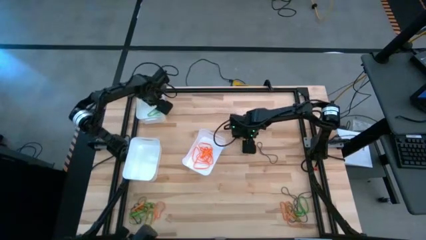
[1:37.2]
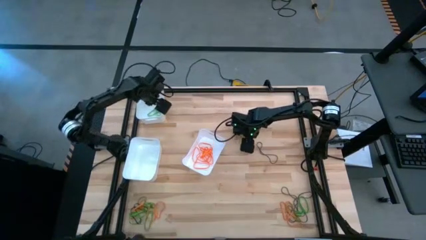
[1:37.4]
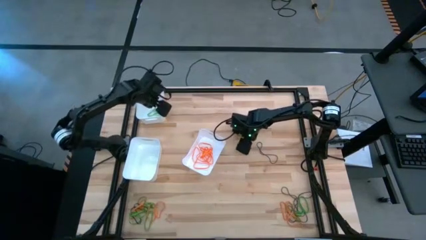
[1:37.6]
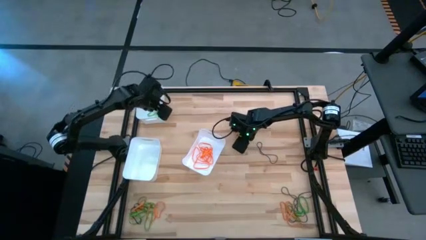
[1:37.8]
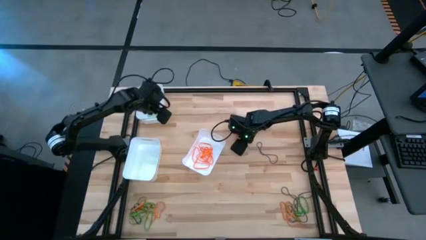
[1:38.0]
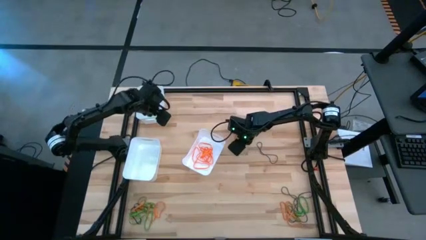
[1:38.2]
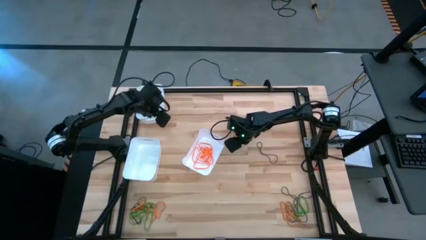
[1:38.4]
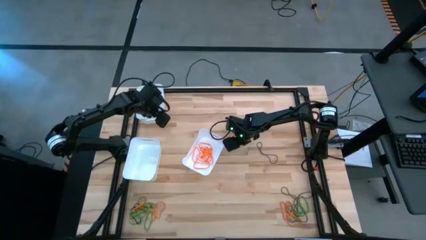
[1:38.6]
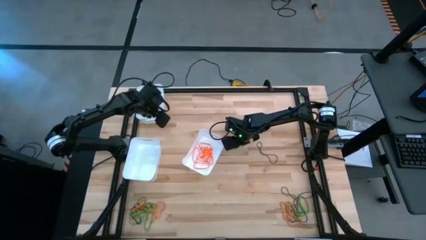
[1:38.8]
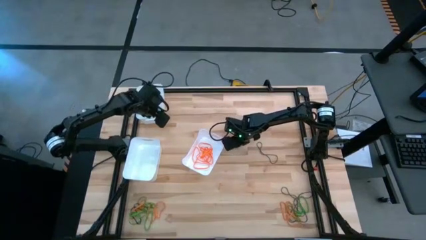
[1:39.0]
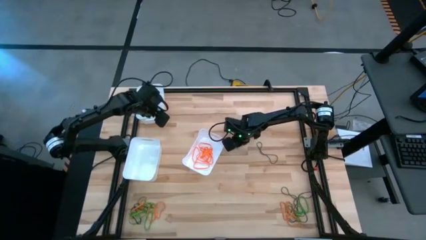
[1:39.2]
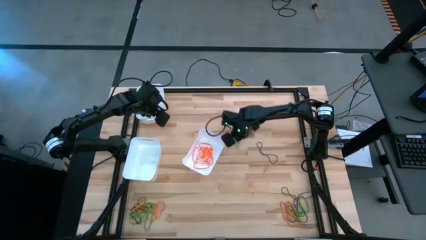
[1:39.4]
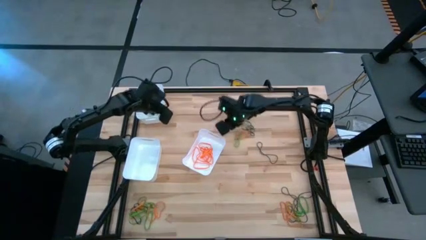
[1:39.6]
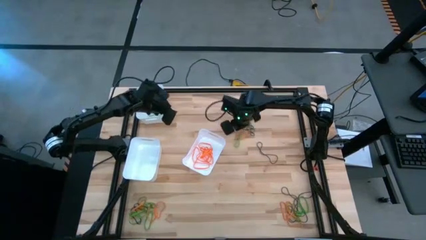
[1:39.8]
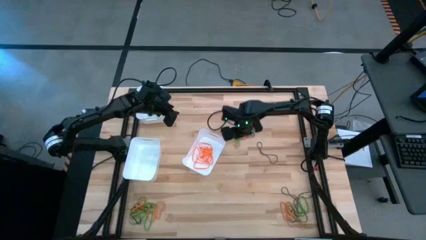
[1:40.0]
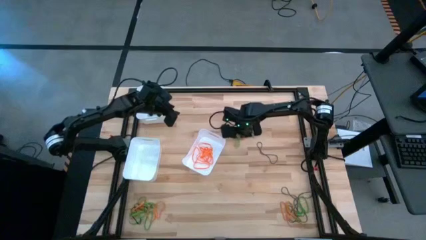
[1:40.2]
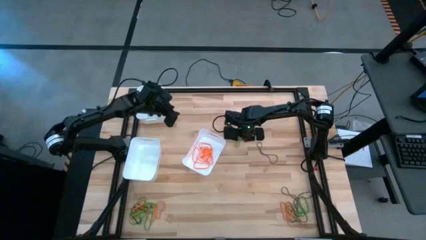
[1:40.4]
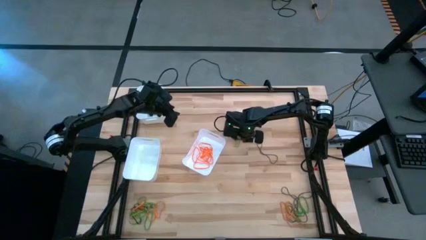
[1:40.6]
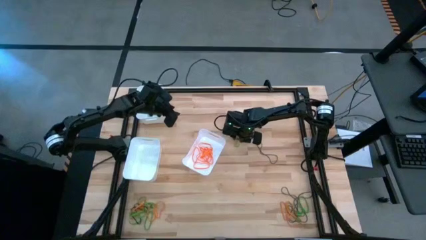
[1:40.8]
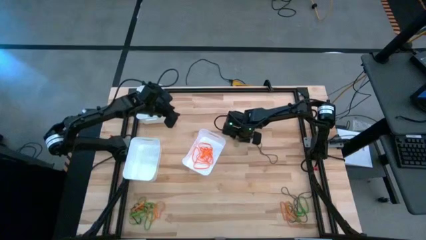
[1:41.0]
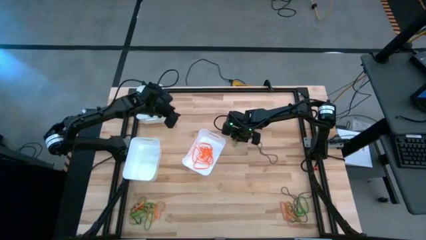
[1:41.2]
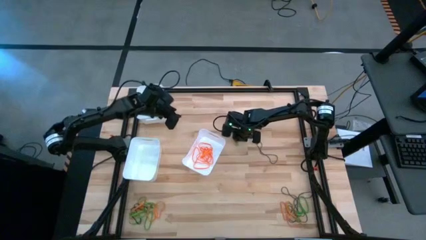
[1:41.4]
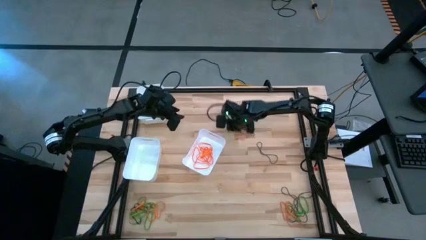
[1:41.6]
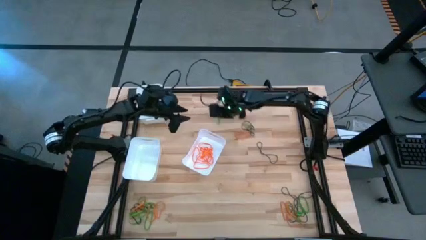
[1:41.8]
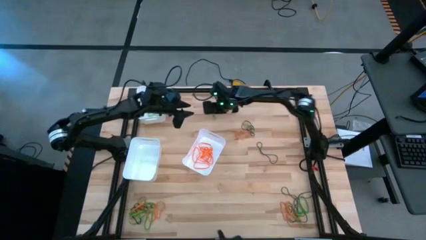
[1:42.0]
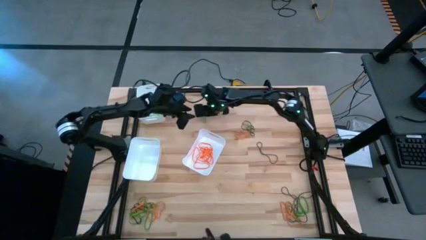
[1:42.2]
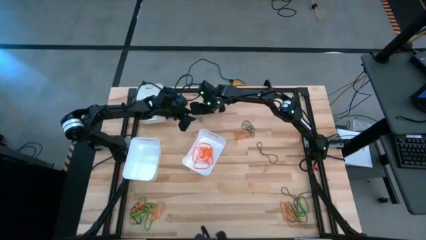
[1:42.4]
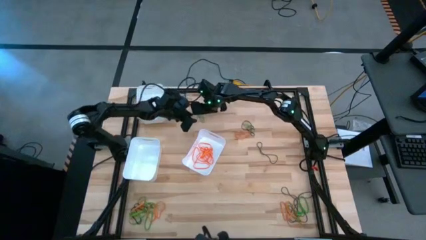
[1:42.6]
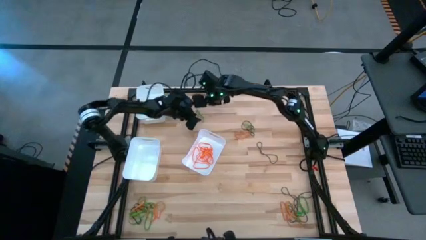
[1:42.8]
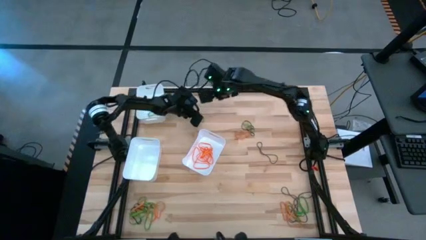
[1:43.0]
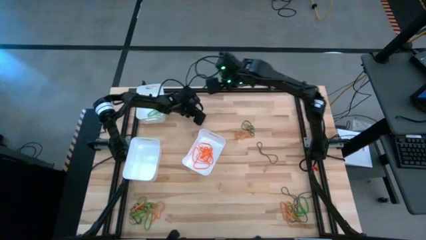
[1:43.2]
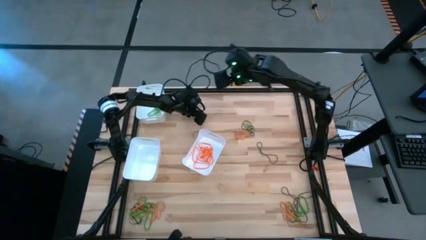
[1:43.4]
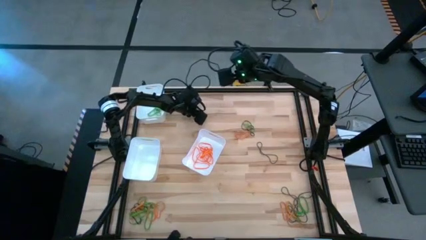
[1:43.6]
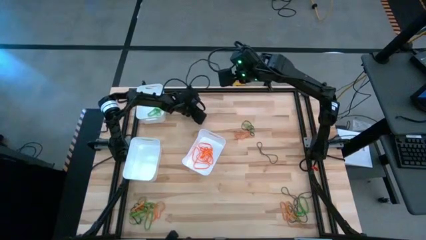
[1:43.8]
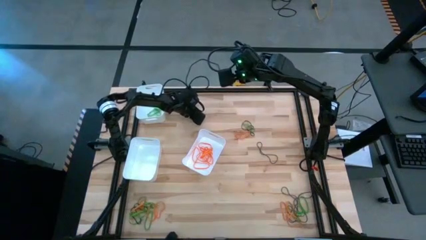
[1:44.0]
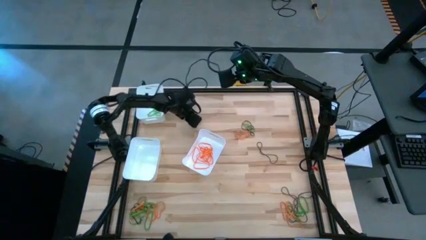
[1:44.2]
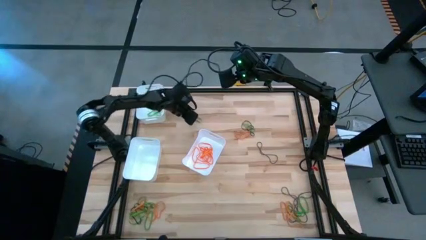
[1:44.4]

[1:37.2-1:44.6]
Task: Sort rubber bands into baskets
Put the green rubber band into the top white bin

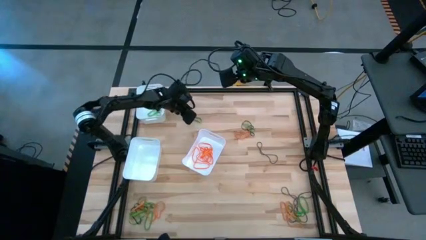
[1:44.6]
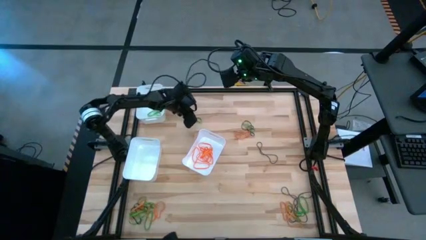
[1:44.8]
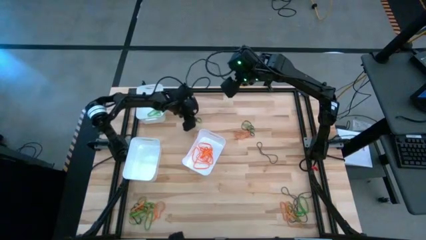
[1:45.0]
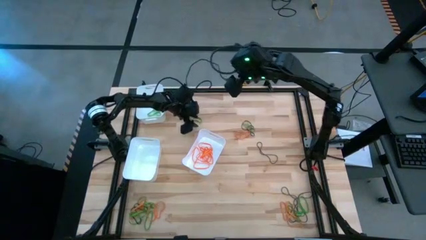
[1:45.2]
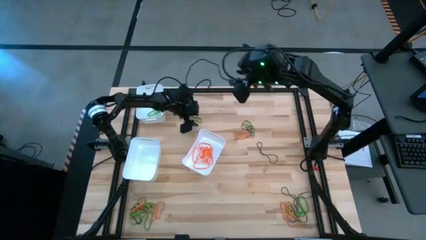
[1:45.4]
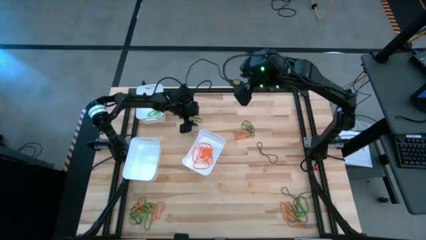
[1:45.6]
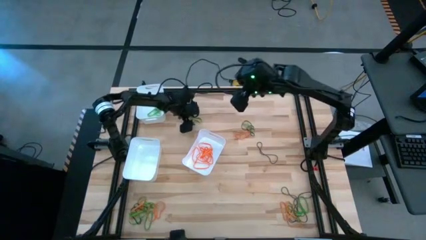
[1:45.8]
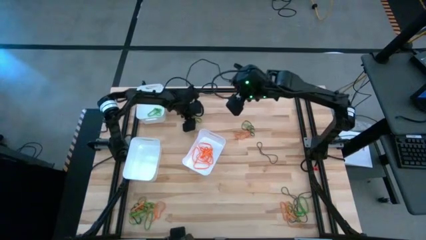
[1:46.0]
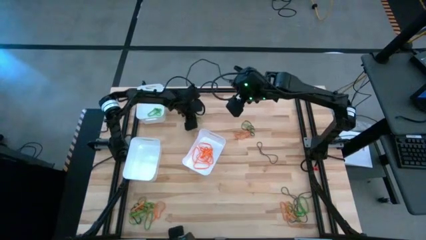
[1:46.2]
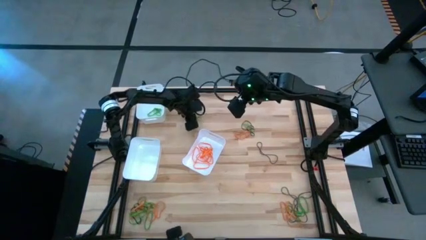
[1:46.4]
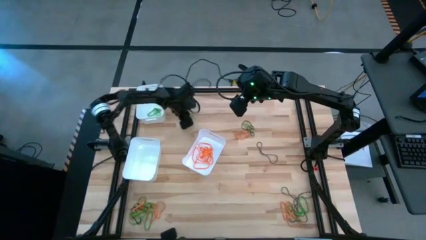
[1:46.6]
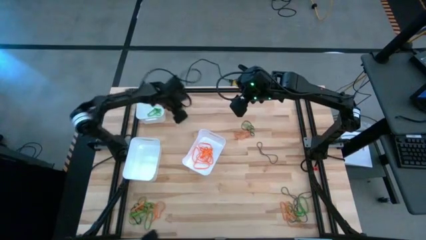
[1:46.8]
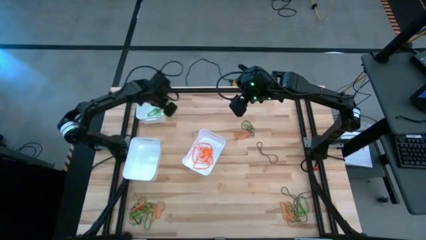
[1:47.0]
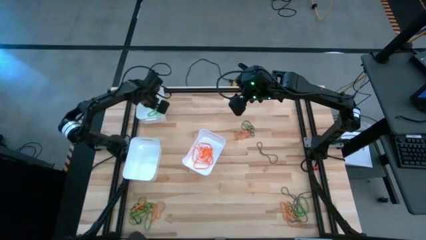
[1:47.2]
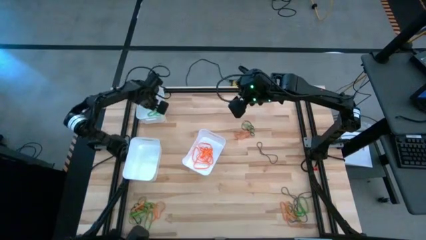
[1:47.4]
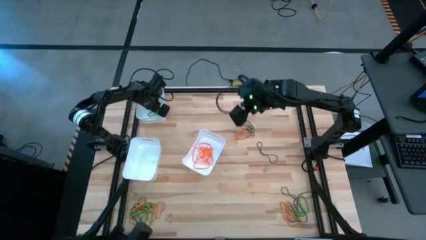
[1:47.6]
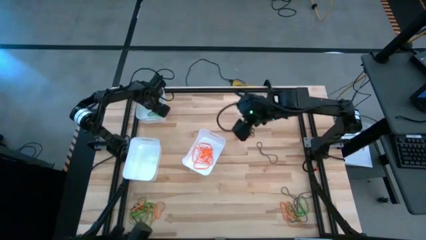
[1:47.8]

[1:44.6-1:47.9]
Put the green rubber band into the top white bin

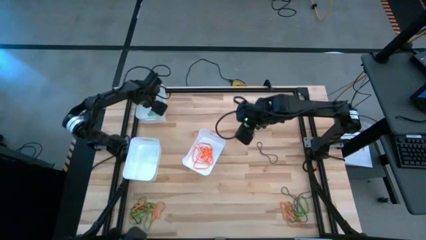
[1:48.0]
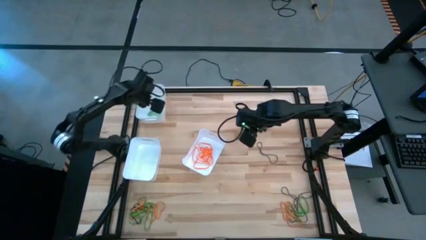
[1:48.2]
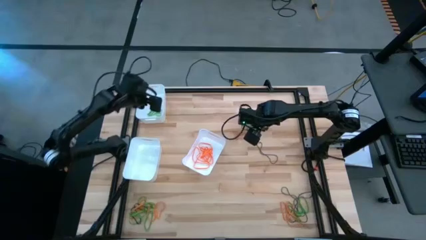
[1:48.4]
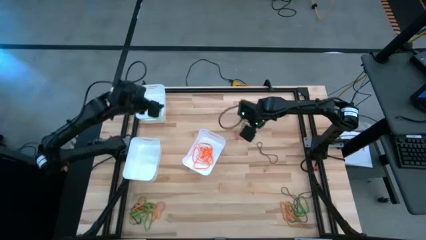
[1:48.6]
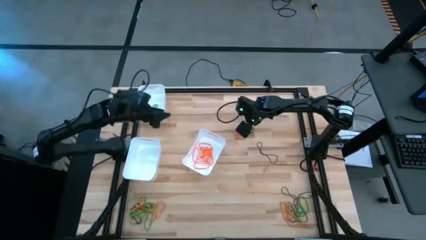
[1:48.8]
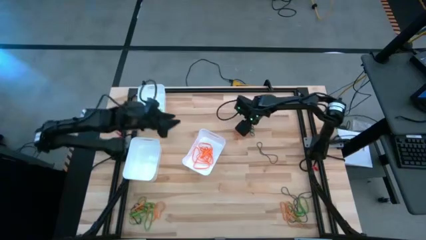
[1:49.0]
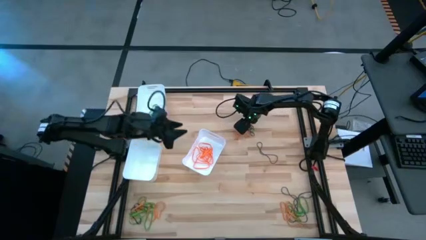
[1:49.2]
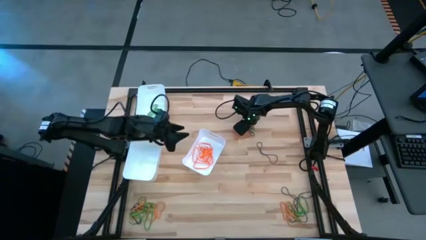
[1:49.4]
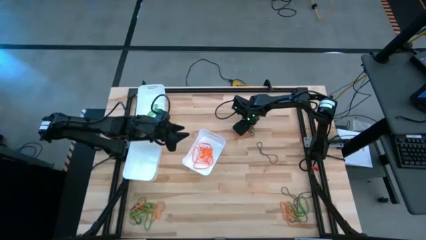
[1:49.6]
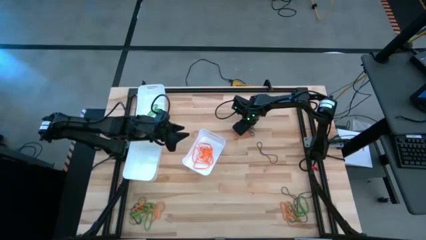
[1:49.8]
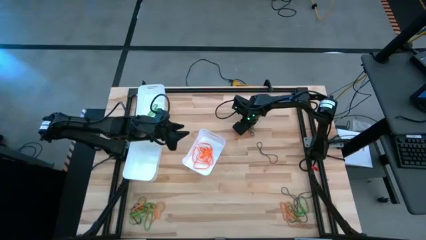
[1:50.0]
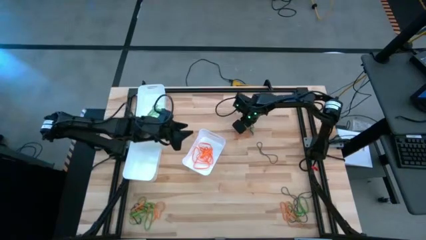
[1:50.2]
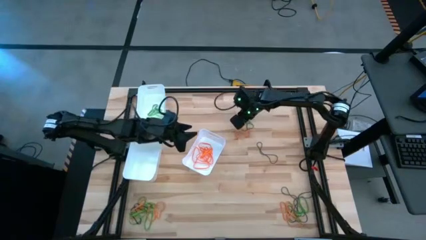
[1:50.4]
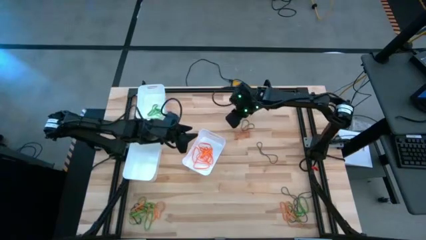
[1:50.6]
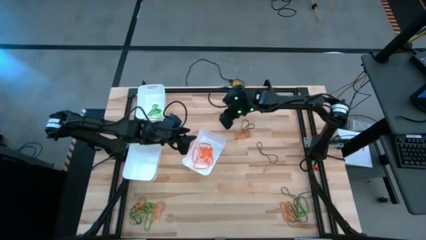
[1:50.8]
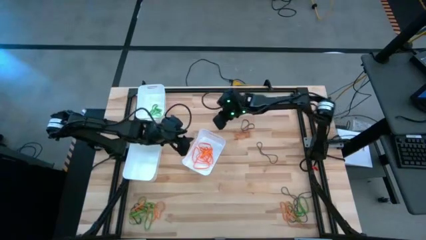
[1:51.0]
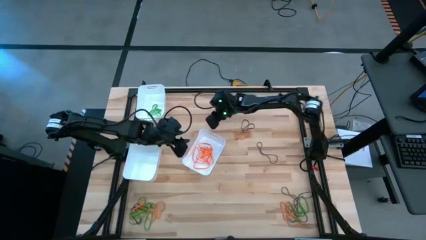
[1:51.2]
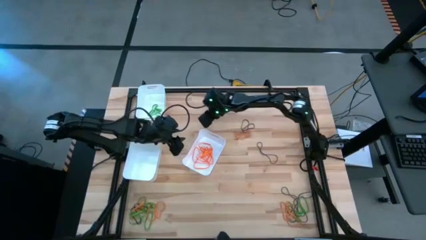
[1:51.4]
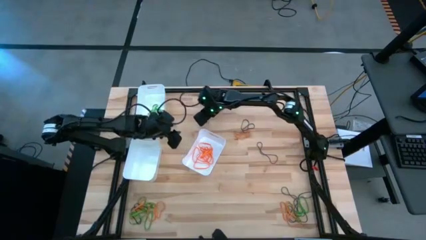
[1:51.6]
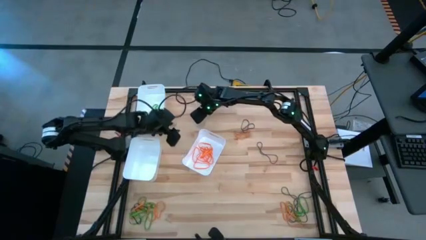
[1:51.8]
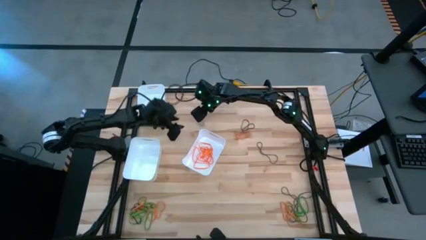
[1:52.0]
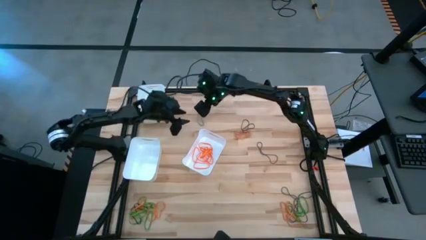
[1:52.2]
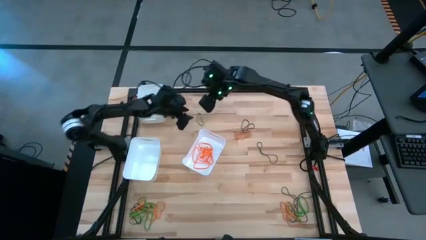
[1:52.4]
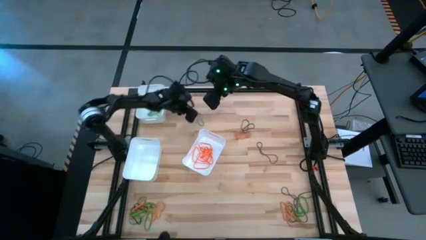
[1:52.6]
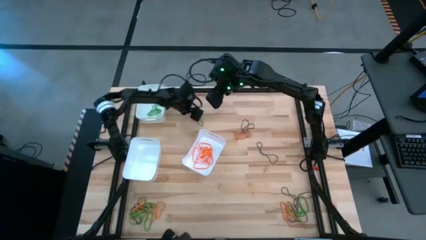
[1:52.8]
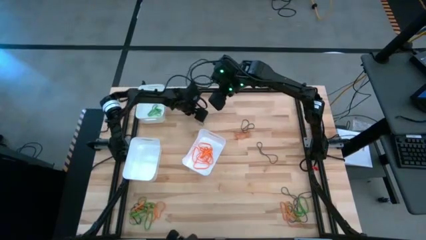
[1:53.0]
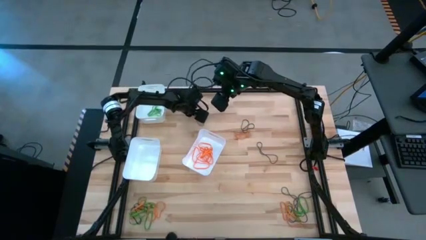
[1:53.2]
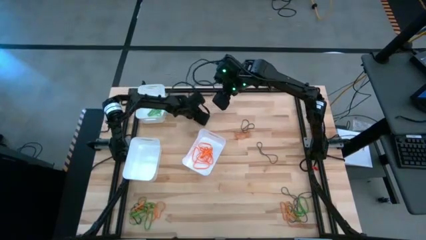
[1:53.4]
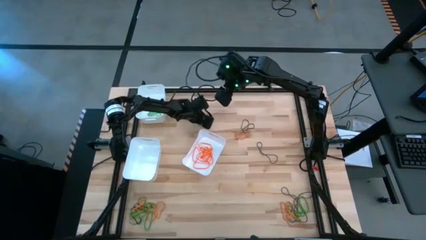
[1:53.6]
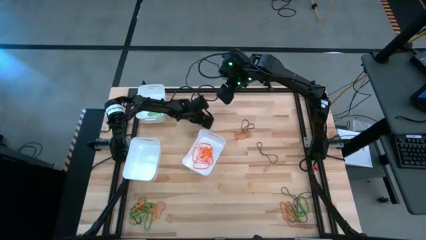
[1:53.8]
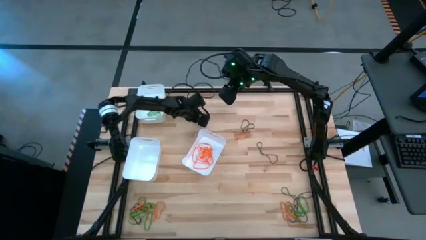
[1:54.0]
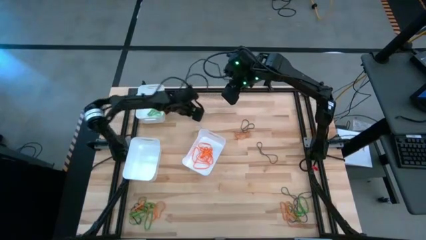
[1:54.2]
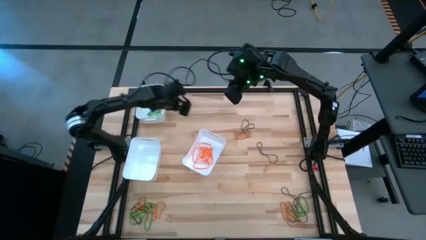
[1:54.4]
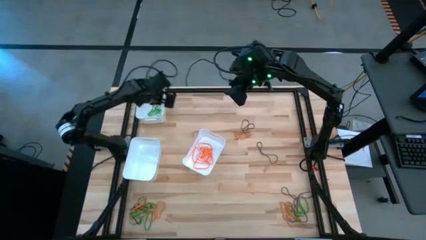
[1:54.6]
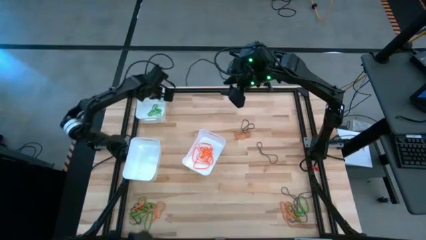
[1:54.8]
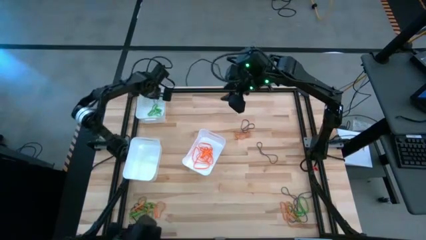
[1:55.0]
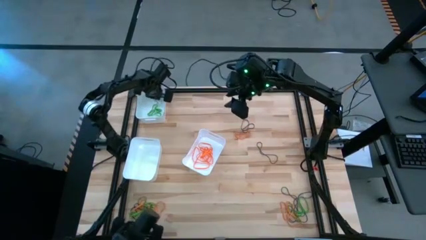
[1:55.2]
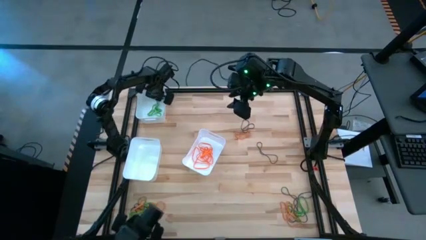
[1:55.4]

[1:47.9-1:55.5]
Put the green rubber band into the top white bin
